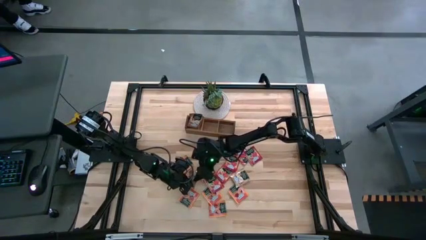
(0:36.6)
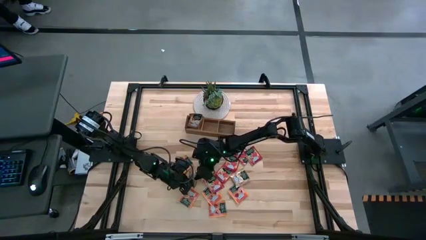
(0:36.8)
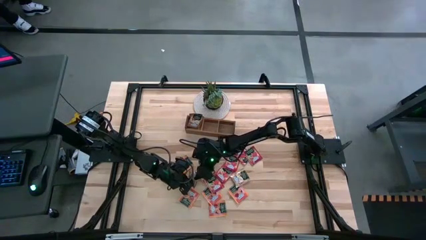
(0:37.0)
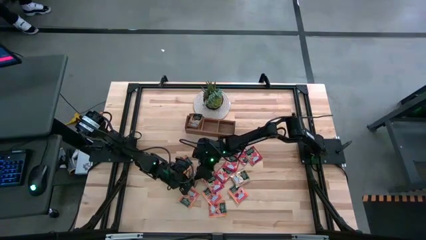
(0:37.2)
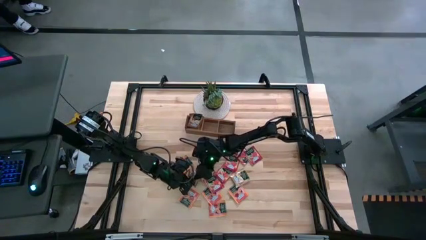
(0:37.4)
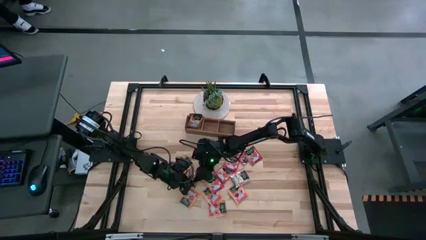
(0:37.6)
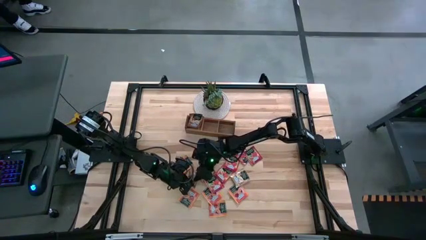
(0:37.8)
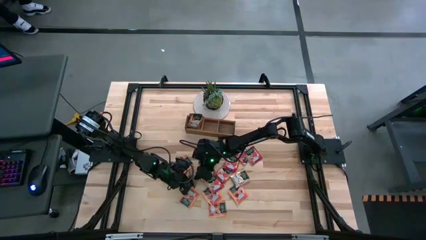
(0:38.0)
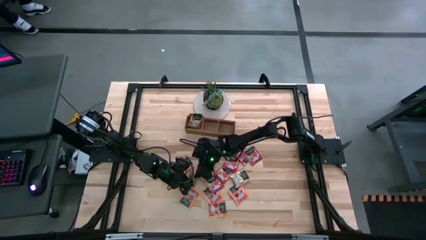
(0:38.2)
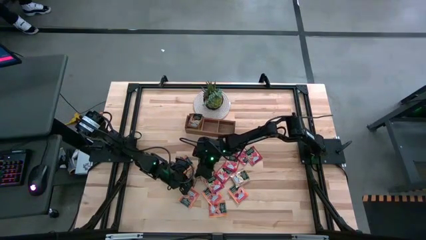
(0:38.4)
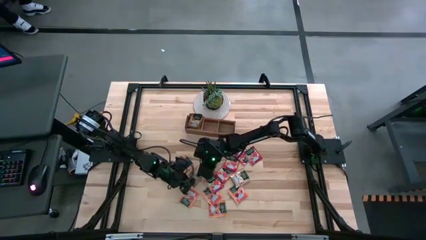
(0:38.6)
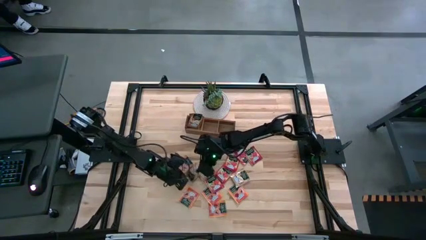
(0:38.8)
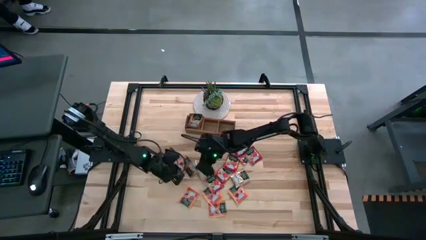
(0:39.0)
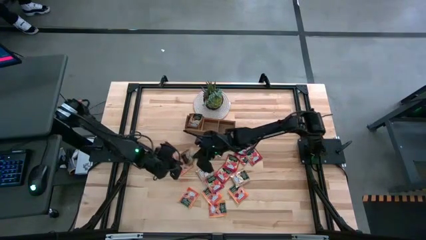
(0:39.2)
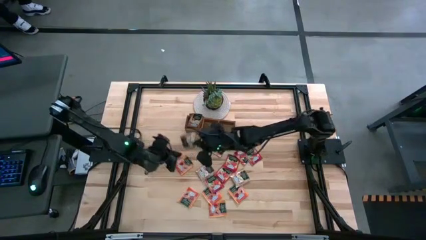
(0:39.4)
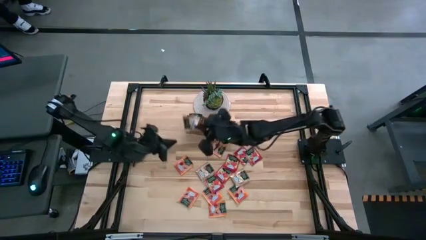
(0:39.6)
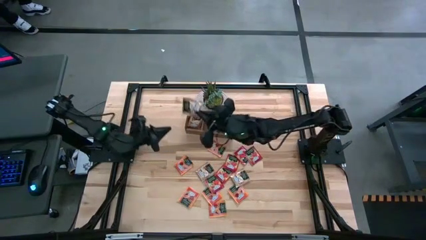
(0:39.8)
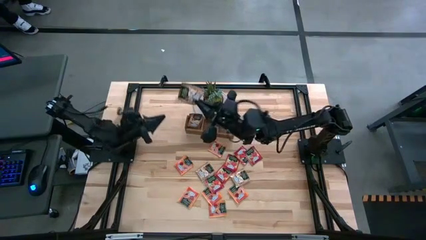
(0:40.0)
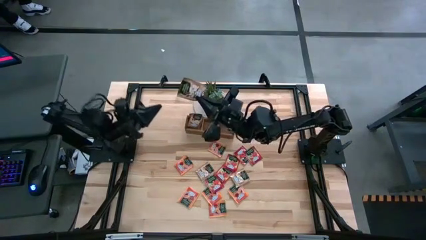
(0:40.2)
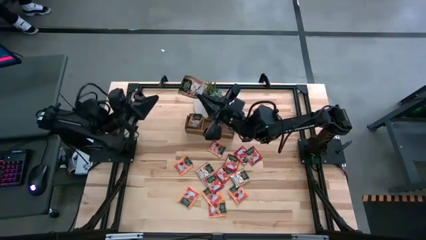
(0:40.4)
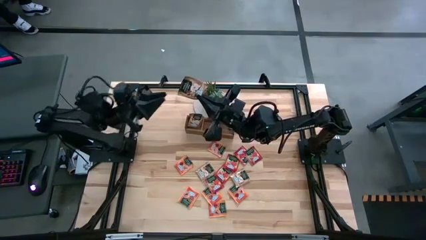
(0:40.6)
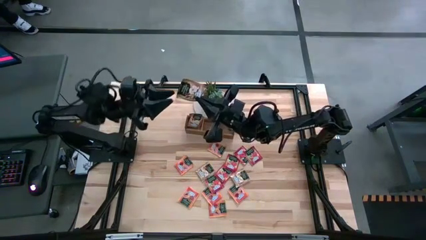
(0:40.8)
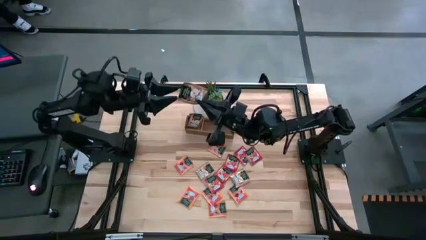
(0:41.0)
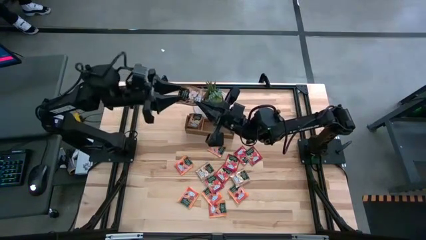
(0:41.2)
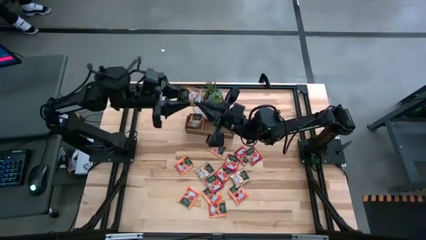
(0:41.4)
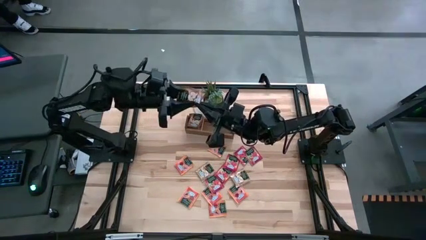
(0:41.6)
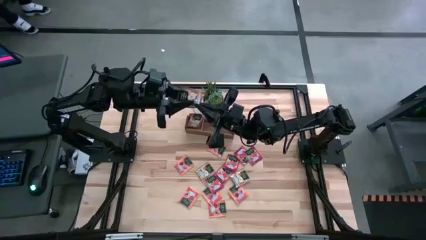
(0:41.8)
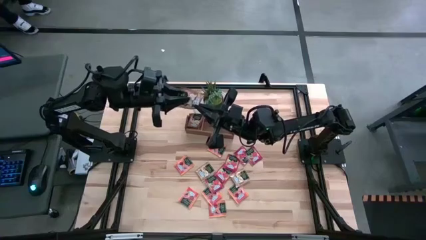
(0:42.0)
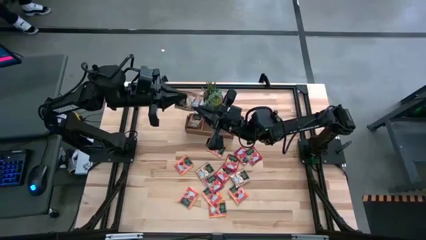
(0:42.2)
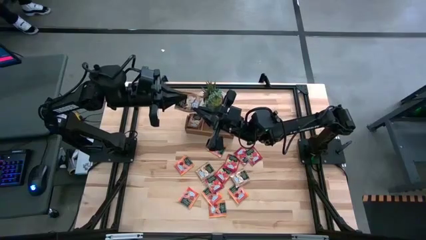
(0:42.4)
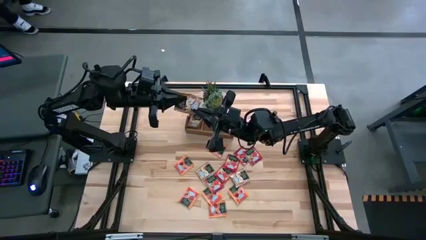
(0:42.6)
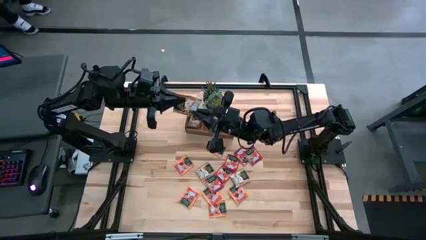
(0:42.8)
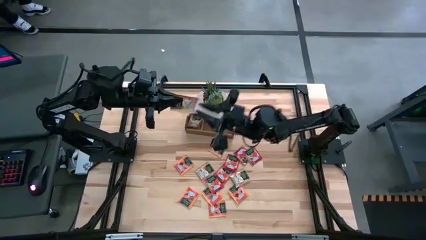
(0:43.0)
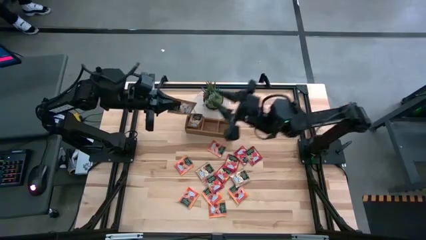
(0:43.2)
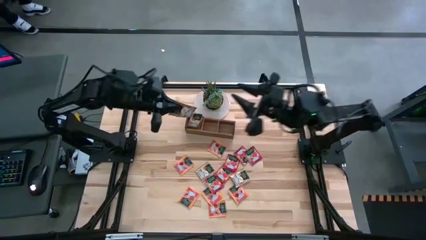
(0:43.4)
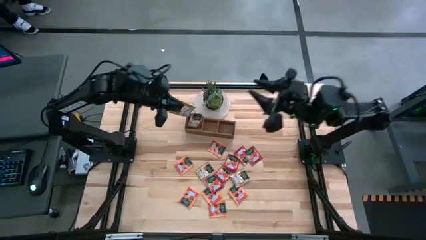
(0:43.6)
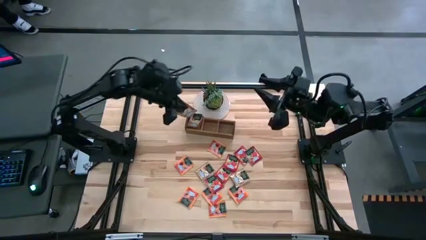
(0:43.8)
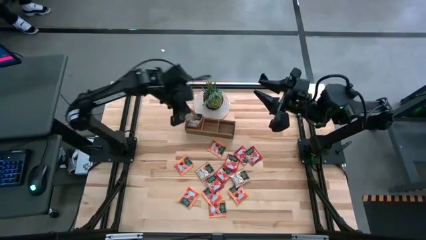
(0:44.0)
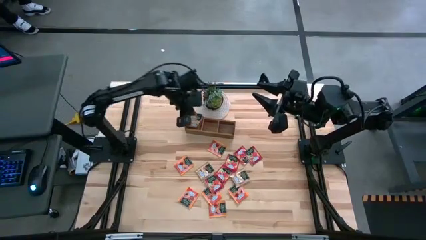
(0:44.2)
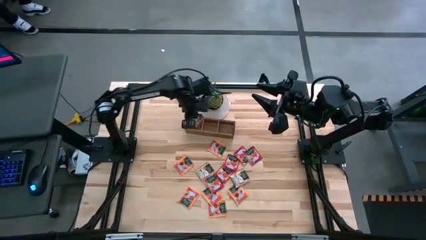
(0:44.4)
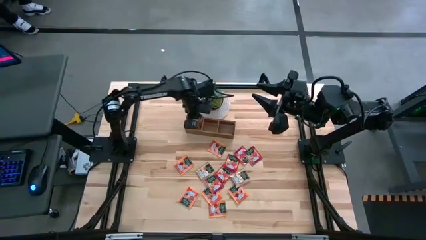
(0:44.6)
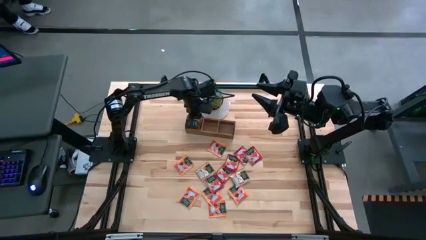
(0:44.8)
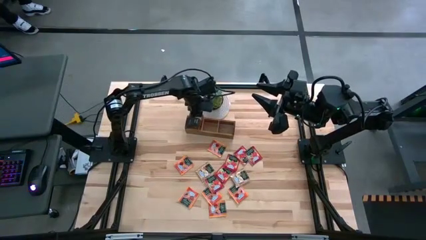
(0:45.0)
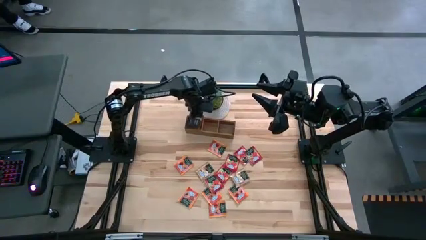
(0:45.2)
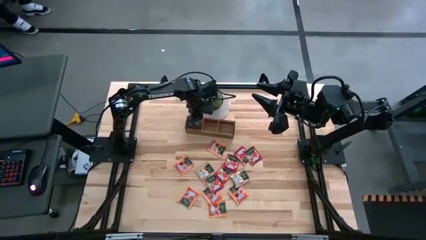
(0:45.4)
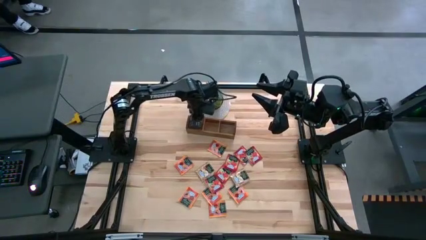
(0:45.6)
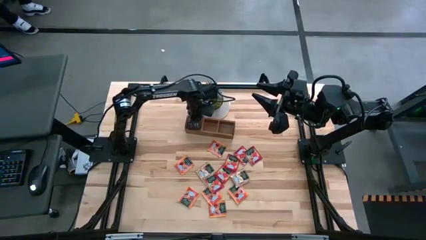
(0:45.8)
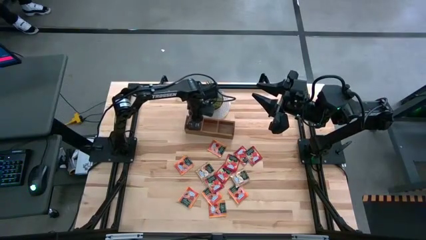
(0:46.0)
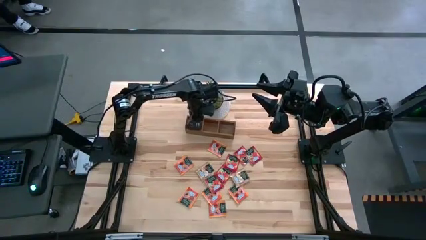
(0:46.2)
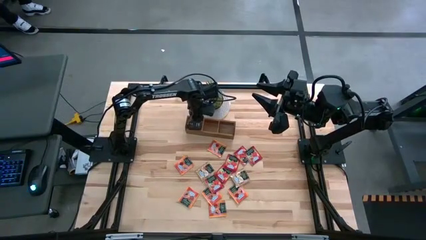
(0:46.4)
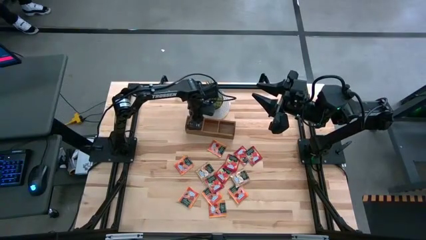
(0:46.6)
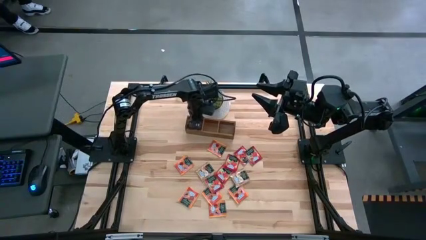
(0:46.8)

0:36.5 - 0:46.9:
Task: Pick & Place Tea
Put the left brown tea bag into the left section of the wooden organizer

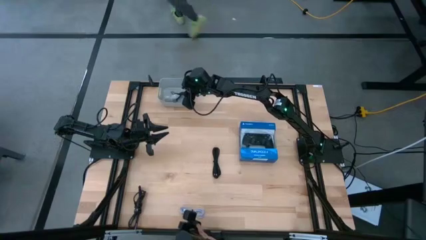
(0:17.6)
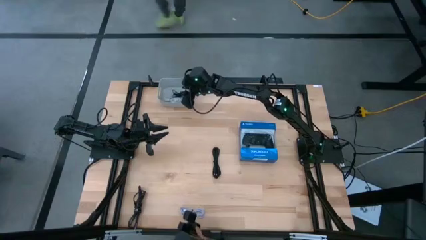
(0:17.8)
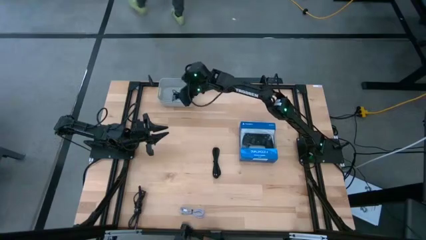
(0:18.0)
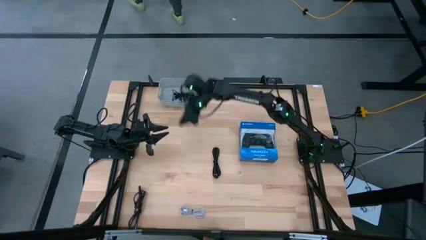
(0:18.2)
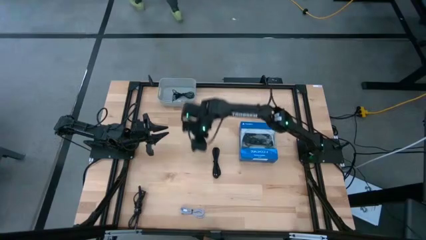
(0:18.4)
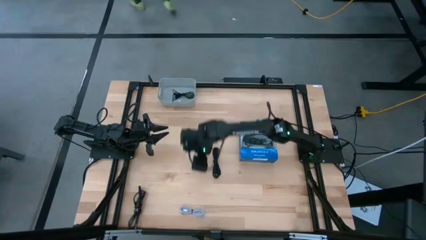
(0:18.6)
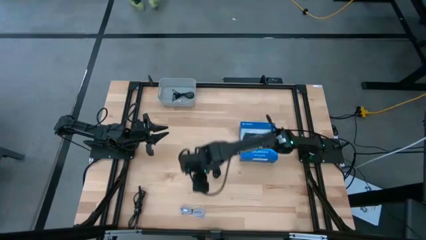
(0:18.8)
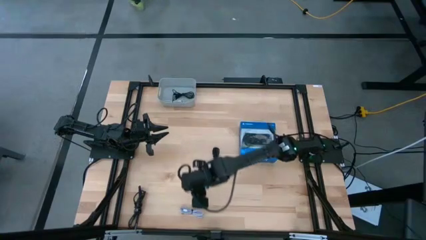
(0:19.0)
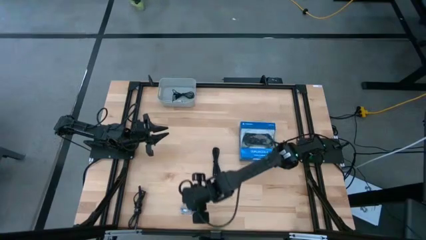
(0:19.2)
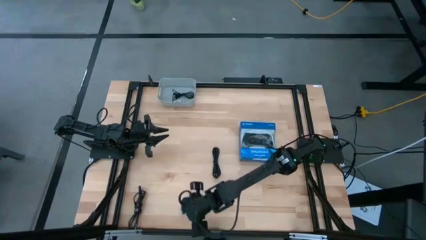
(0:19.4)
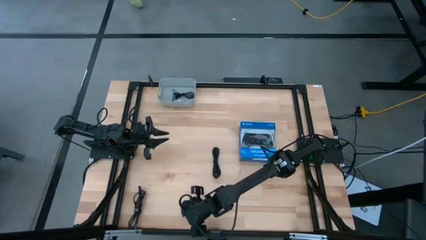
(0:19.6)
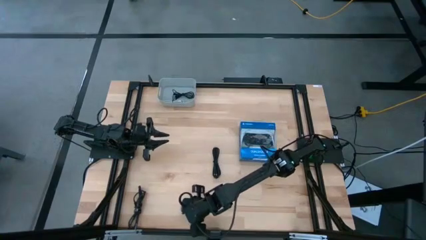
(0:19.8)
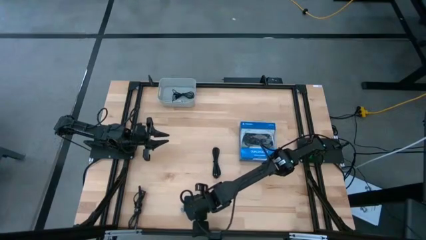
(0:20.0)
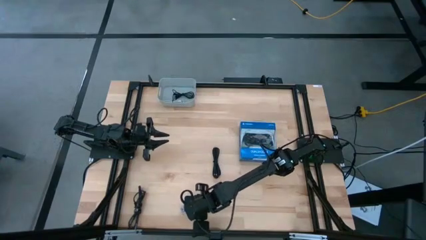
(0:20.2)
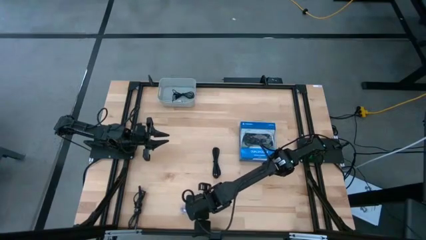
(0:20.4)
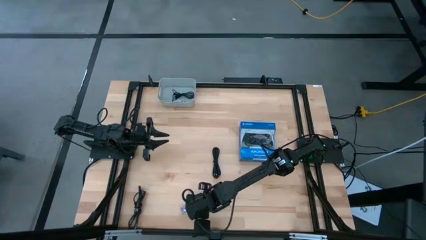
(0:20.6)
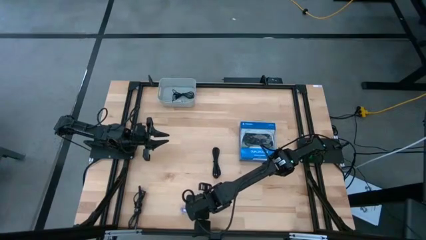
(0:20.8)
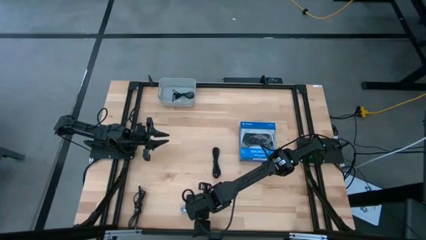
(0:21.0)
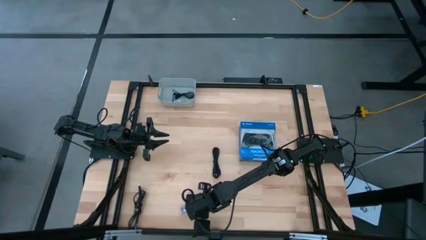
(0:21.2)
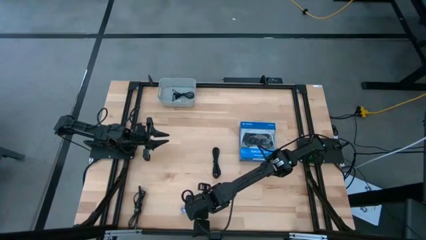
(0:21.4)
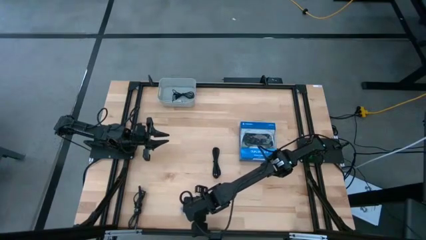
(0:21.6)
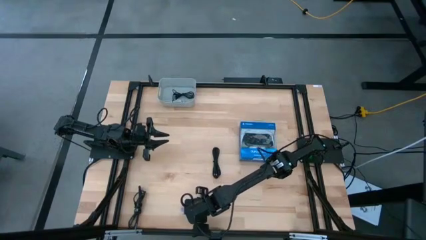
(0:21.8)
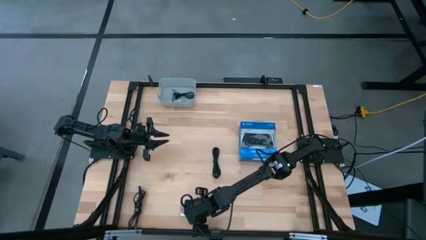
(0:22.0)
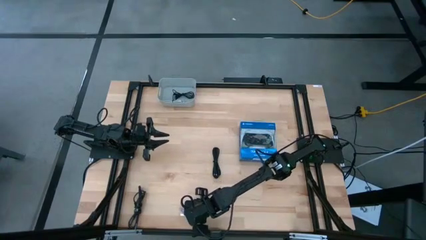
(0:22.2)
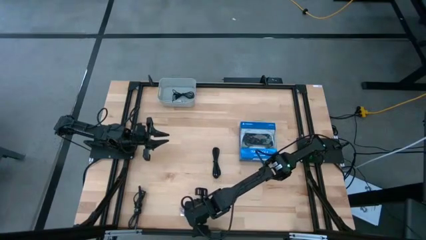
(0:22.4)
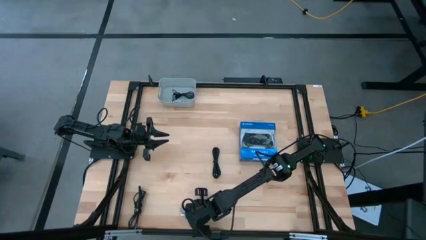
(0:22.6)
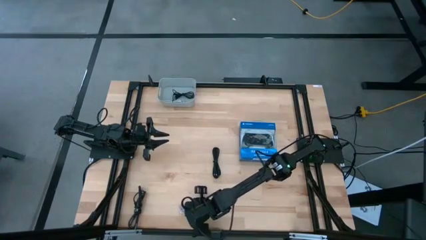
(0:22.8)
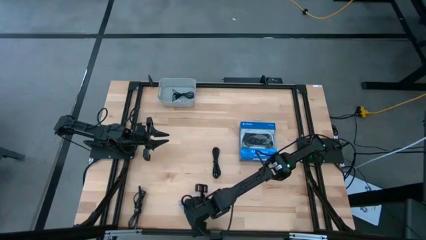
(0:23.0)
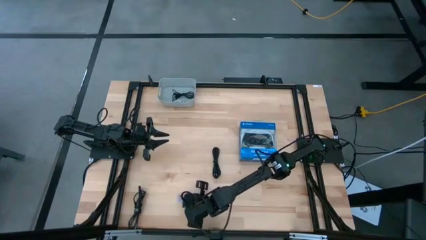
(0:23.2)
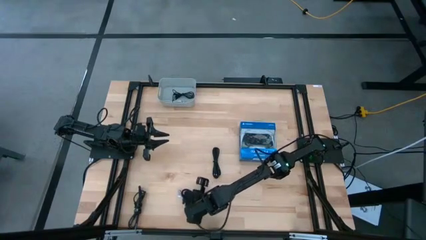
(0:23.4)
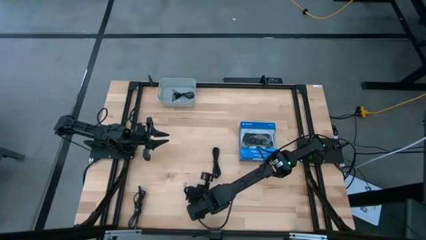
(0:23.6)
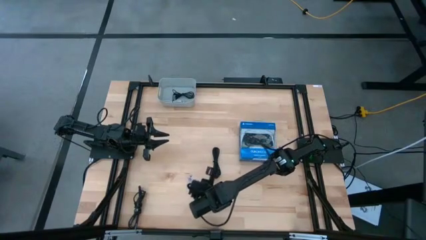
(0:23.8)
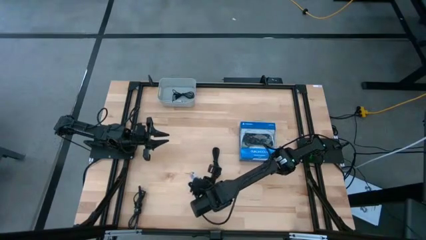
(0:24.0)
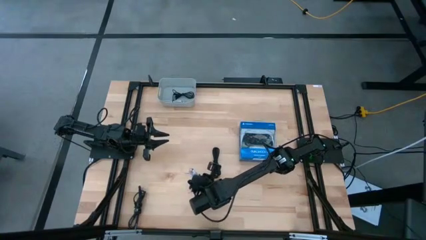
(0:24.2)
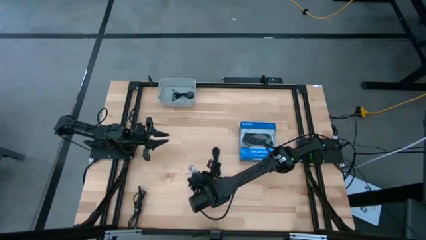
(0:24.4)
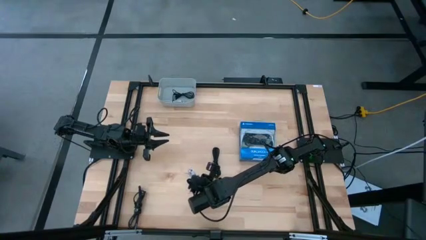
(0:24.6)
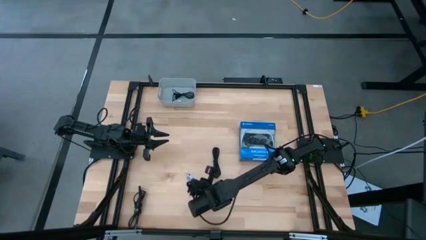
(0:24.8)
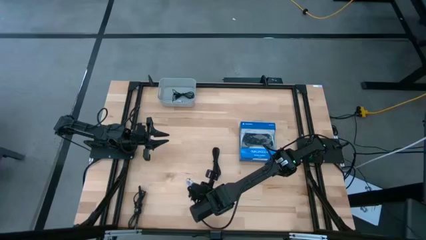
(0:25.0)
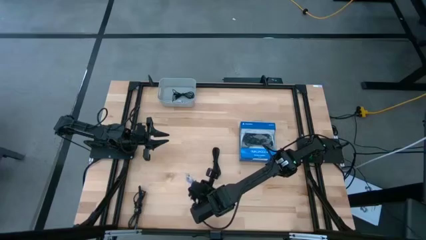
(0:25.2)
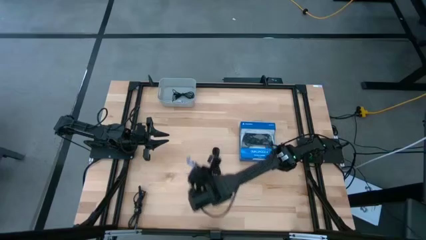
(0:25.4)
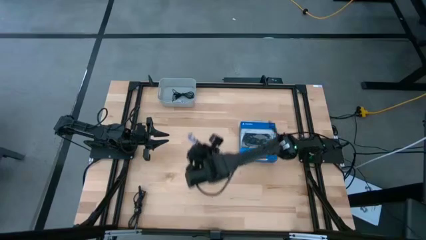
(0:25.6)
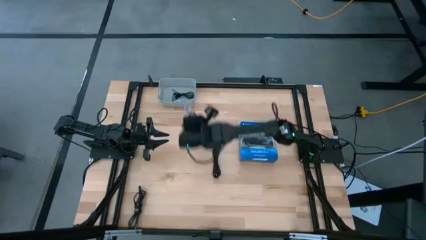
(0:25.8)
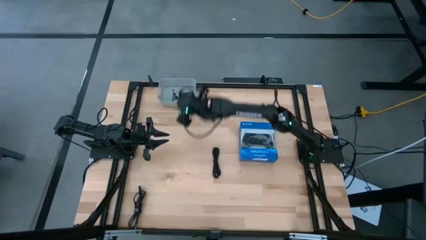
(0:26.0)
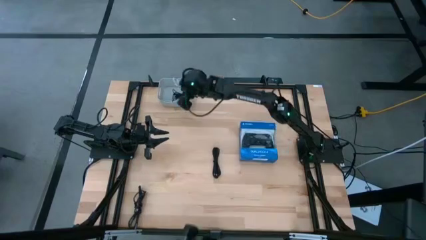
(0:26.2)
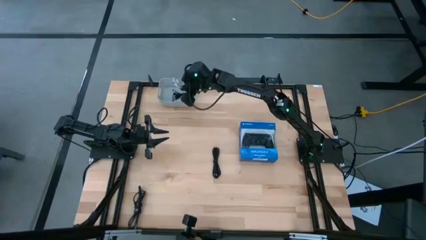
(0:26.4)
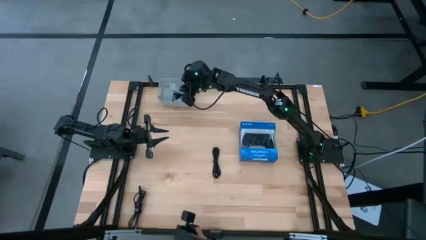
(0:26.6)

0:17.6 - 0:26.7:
Task: Pick and place USB-C Cables
Put the light purple charger cable into the gray bin
